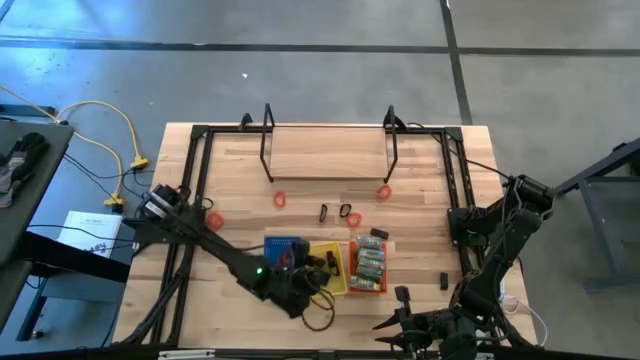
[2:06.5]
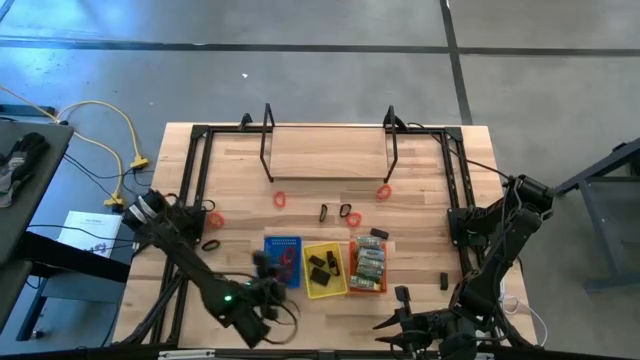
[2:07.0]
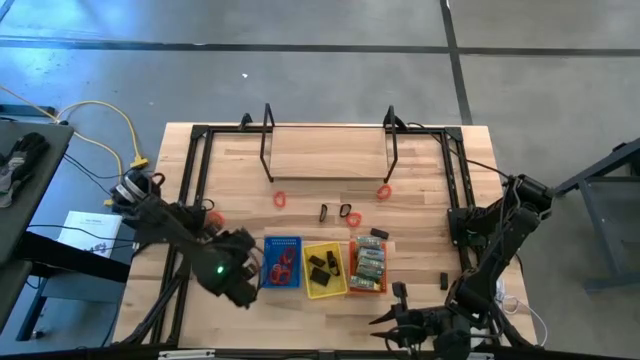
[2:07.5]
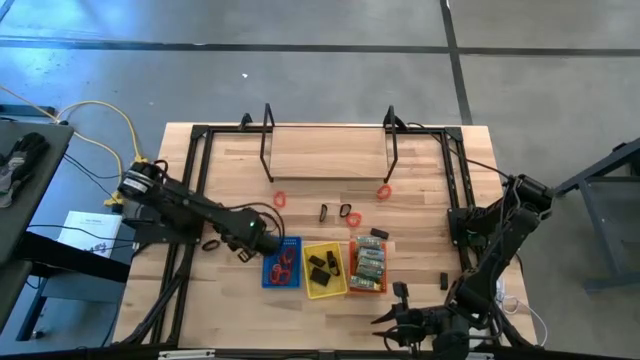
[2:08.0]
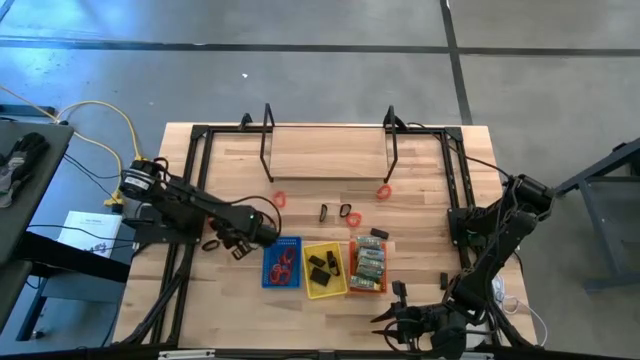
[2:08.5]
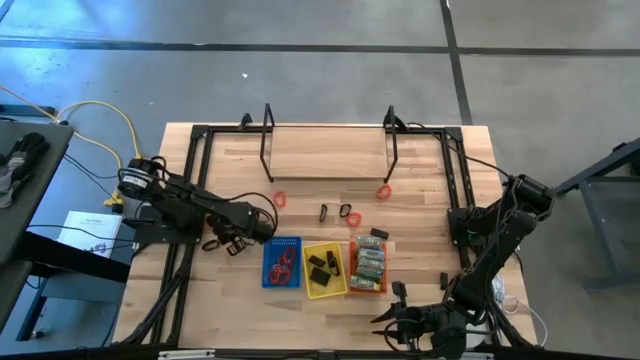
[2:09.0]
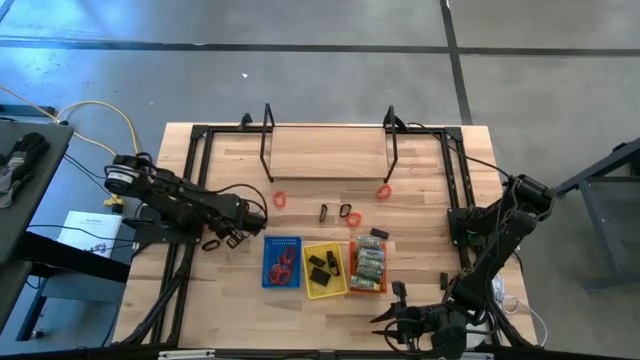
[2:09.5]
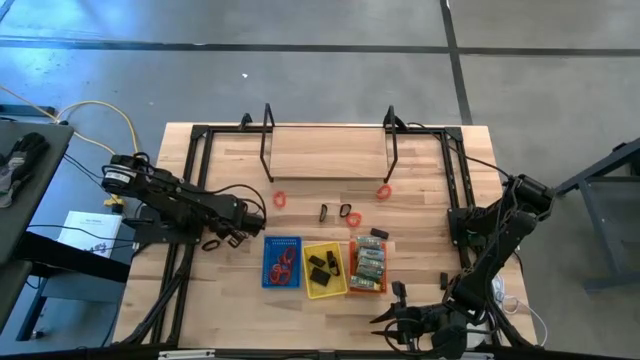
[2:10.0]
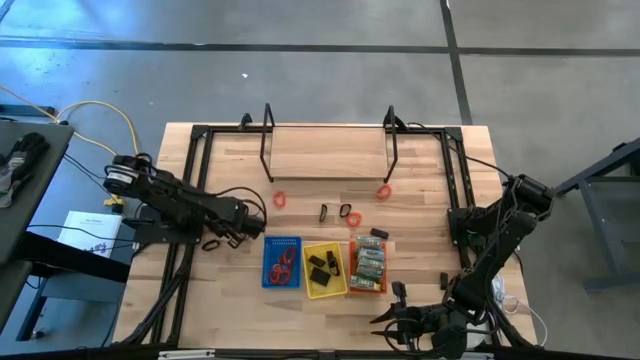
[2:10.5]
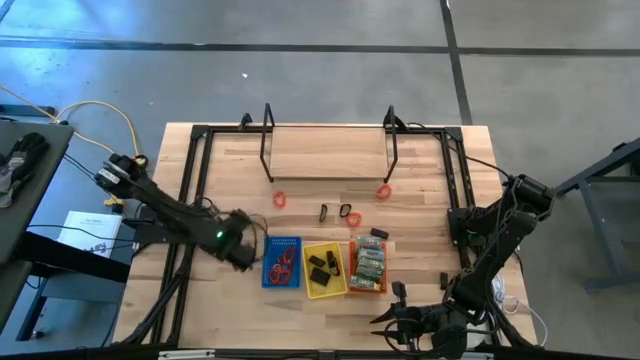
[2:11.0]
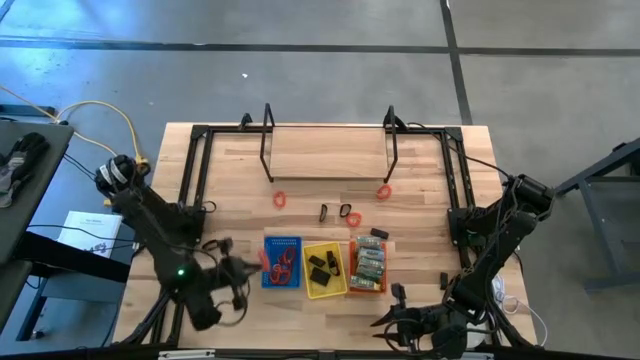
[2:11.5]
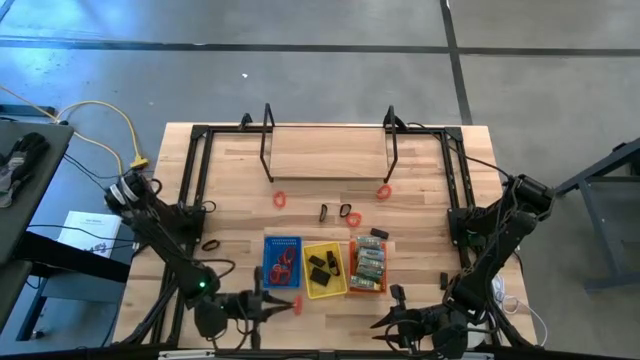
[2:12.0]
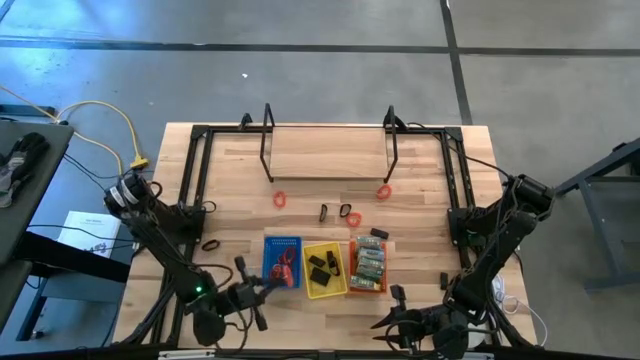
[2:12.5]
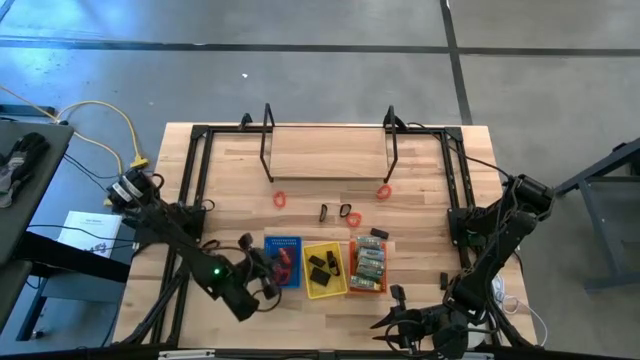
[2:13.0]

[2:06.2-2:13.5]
Task: Pick & Place Office Desk Supplies
Put the orange spring keychain into the blue basket

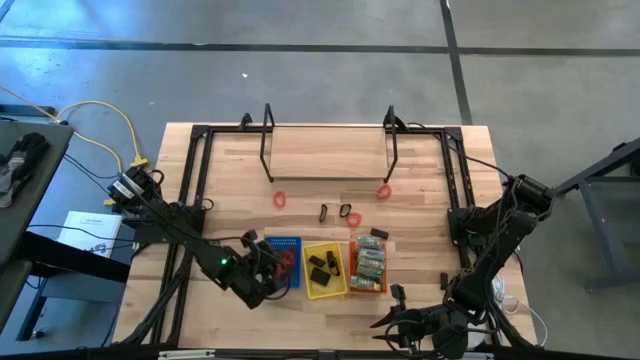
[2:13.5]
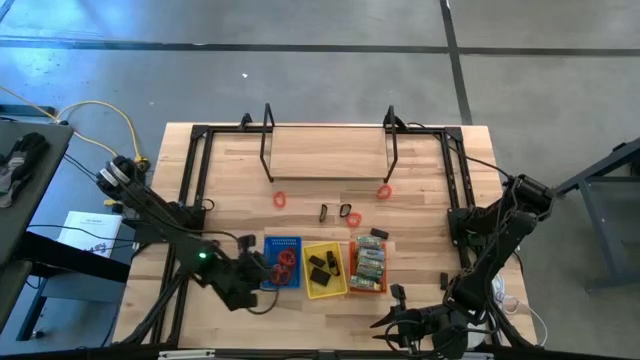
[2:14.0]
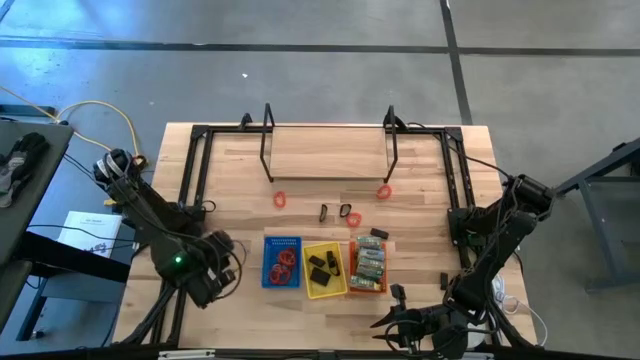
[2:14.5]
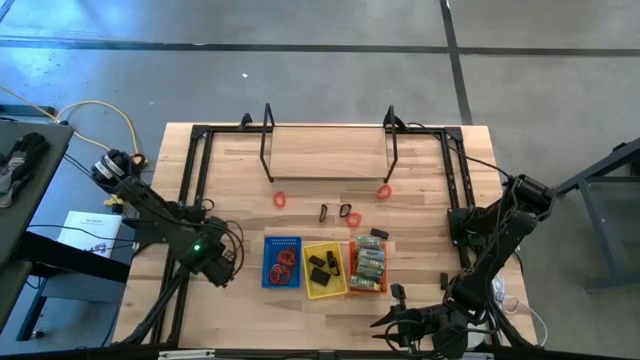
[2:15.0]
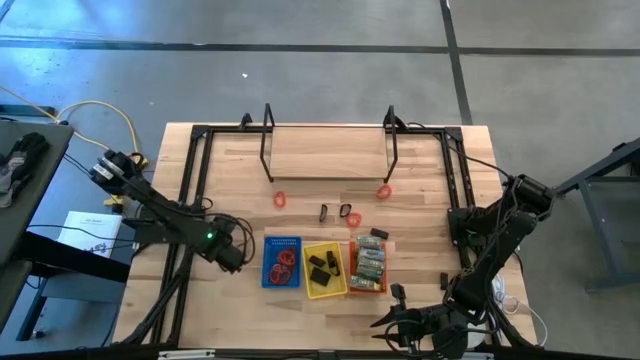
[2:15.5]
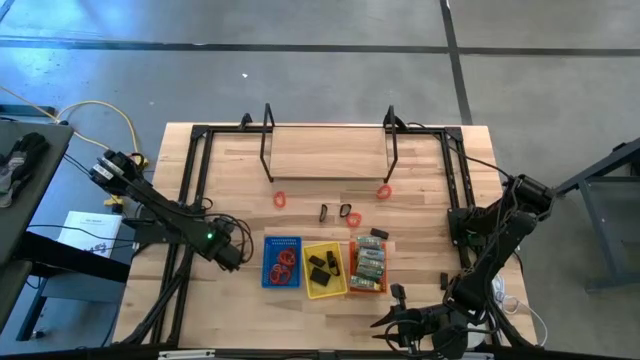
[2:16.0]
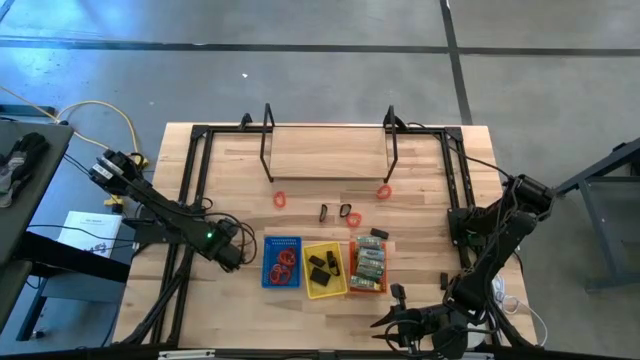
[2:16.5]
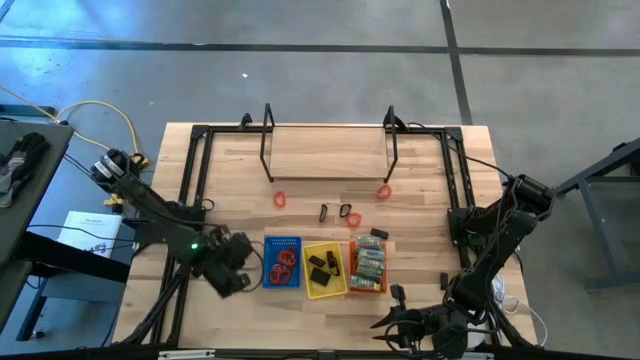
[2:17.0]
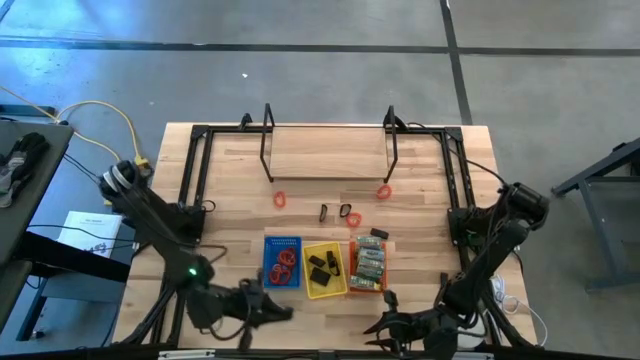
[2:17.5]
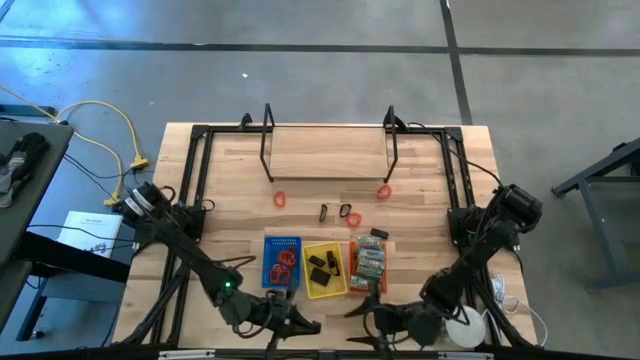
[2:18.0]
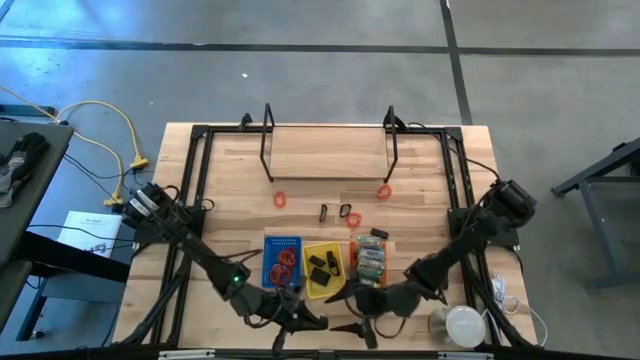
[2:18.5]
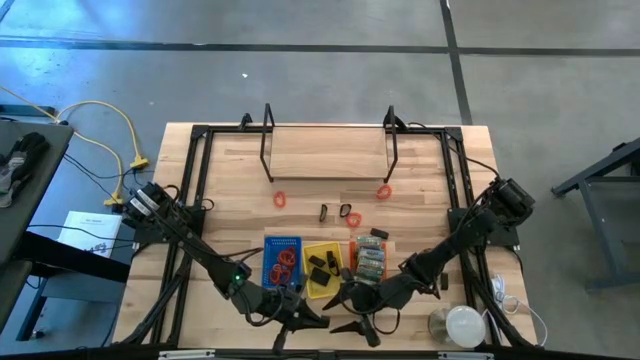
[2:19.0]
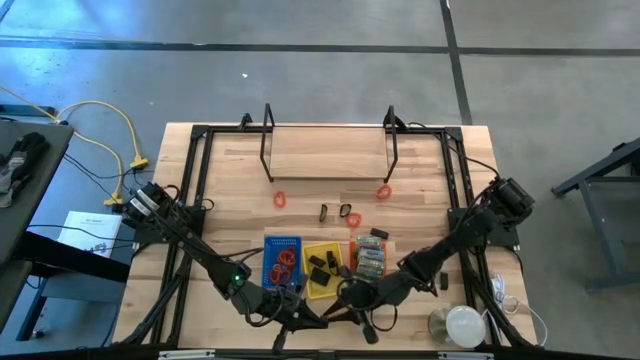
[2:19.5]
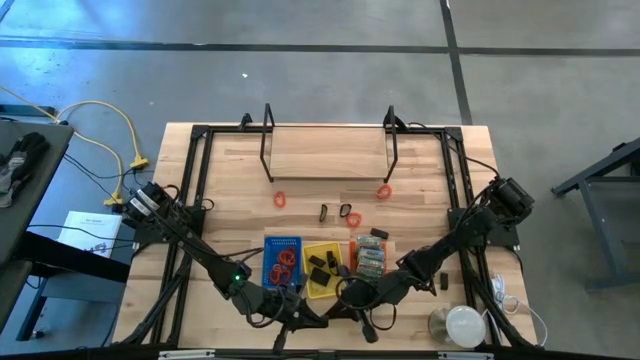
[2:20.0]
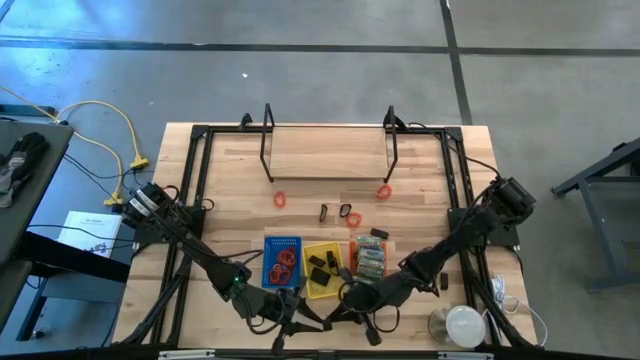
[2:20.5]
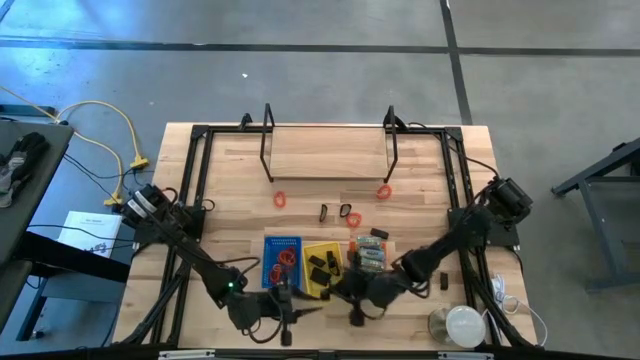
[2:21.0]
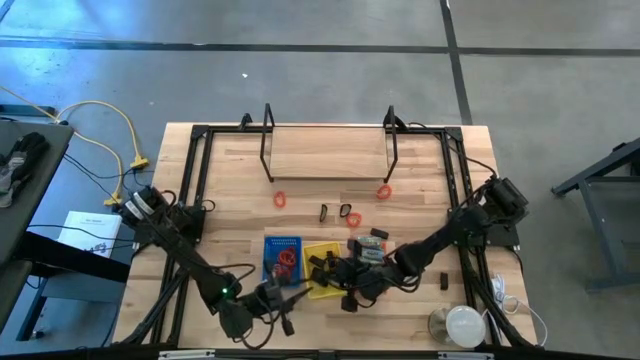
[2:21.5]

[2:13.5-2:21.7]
Put the black rubber band into the yellow basket

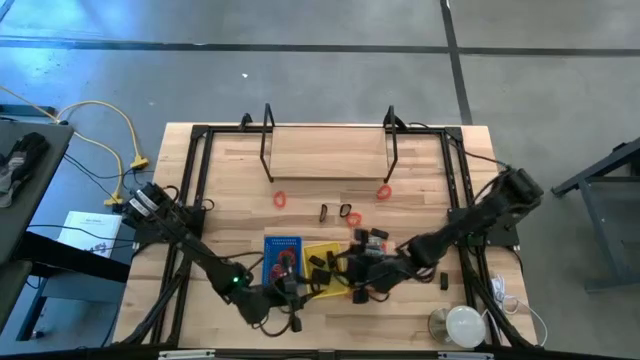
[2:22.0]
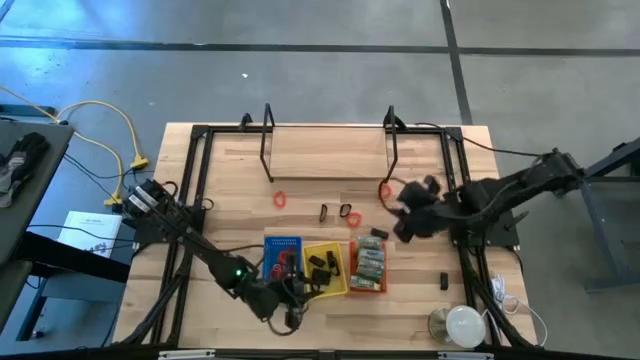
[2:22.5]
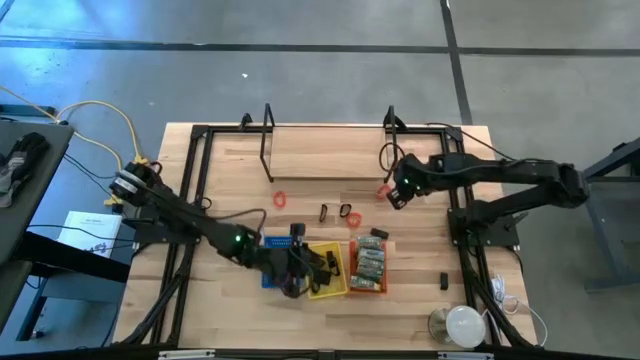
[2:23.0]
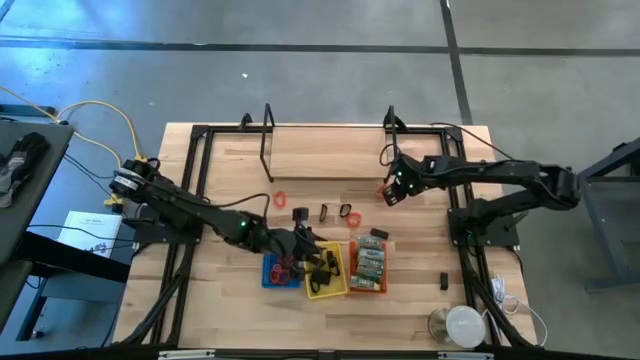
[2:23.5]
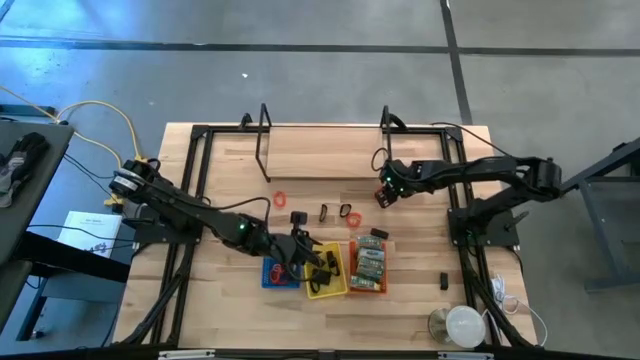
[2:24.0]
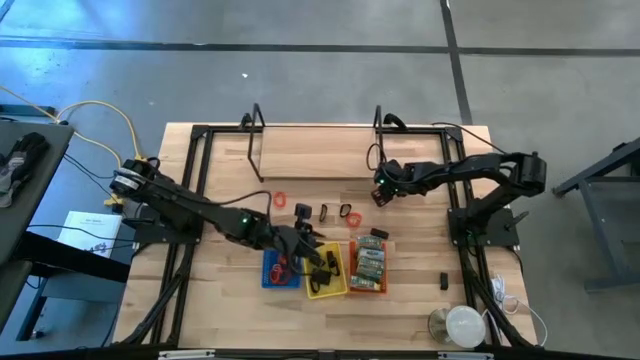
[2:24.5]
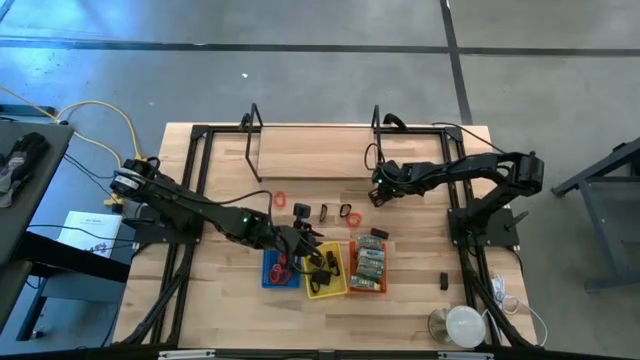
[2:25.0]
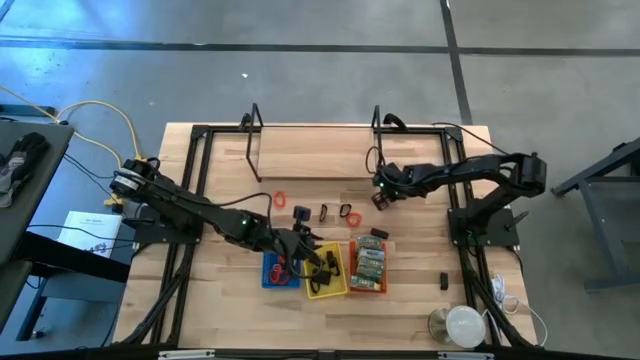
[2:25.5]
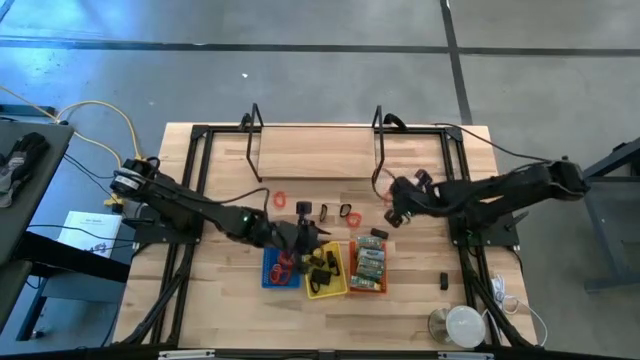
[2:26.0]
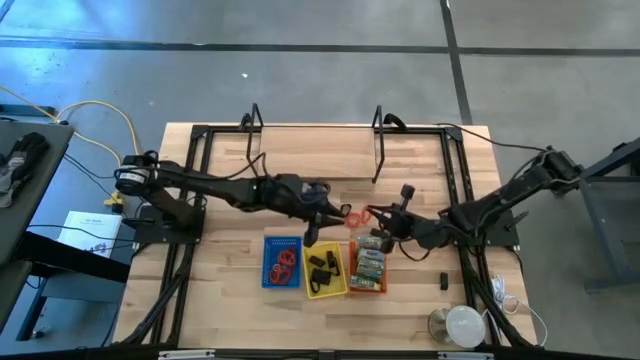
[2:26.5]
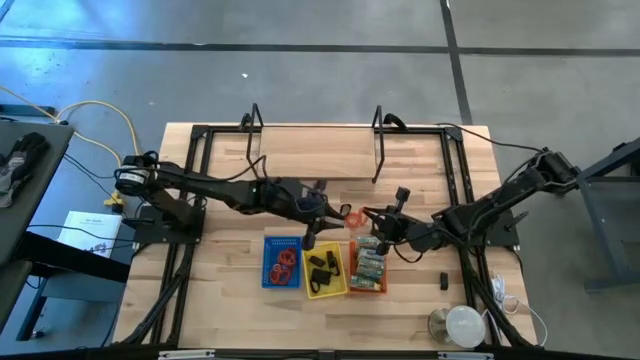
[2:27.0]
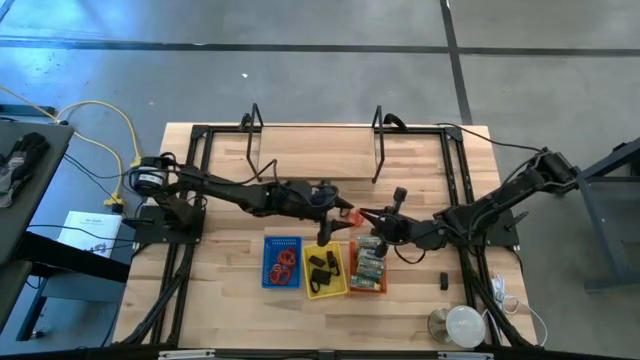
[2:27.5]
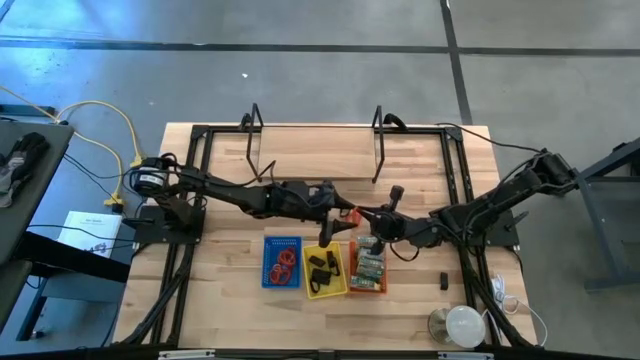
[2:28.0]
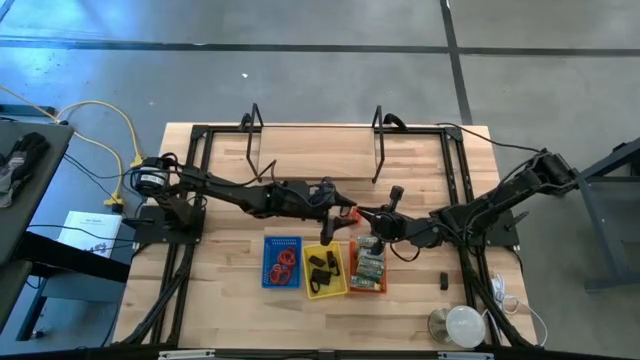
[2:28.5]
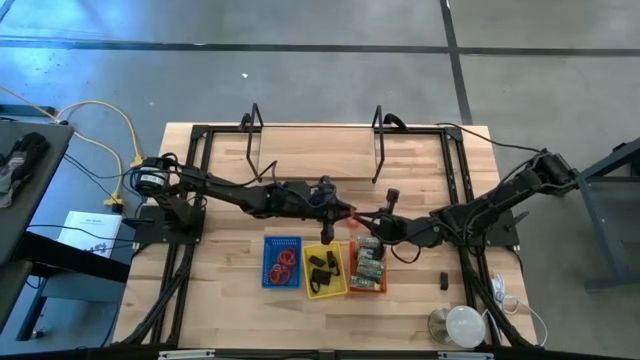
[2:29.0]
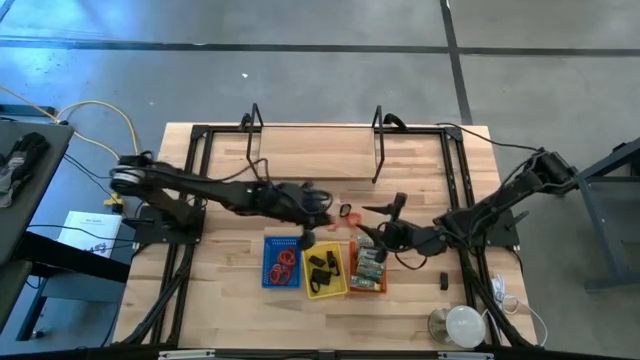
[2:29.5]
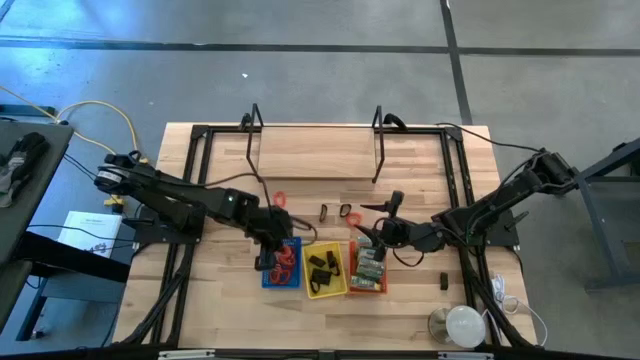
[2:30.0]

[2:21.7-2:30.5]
Put the orange spring keychain into the blue basket
